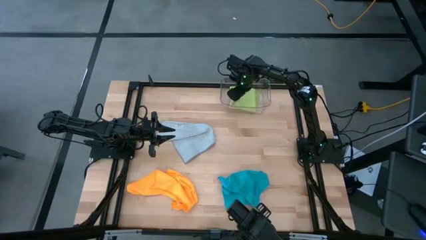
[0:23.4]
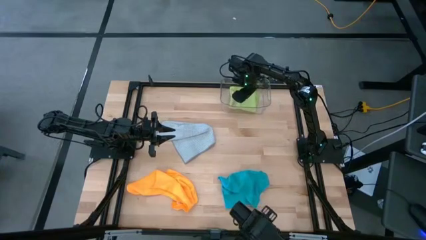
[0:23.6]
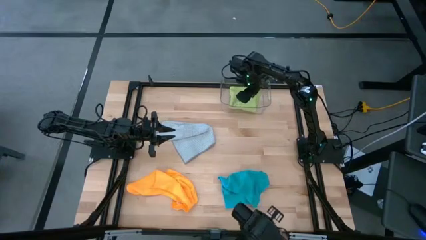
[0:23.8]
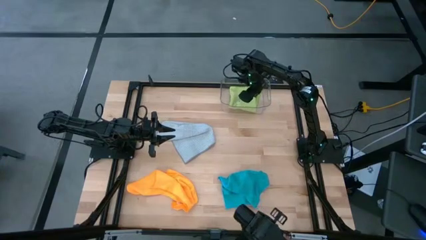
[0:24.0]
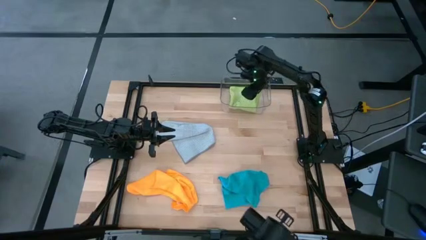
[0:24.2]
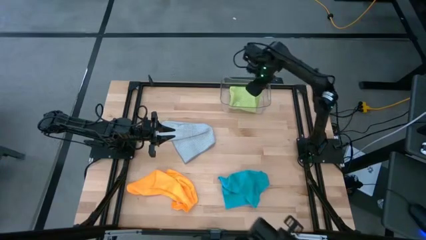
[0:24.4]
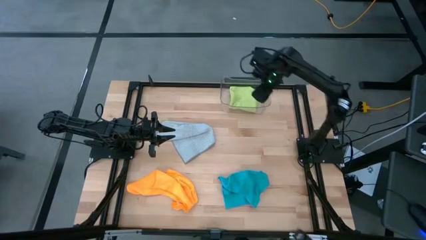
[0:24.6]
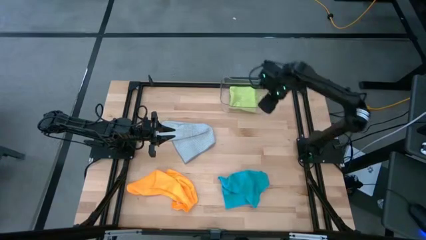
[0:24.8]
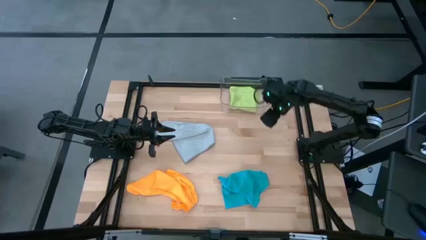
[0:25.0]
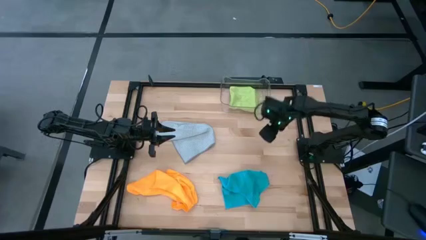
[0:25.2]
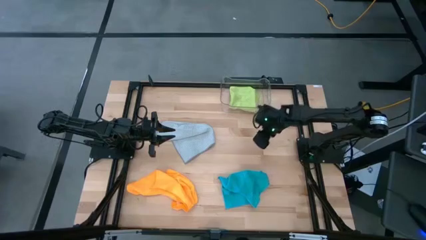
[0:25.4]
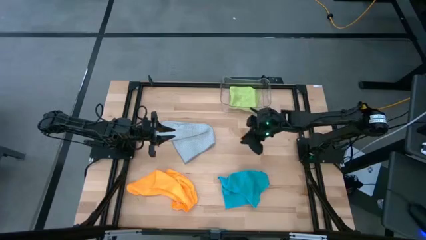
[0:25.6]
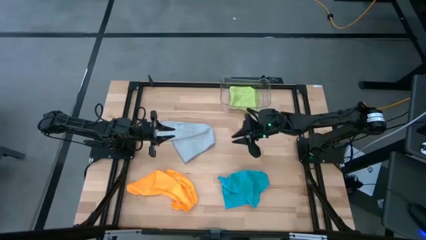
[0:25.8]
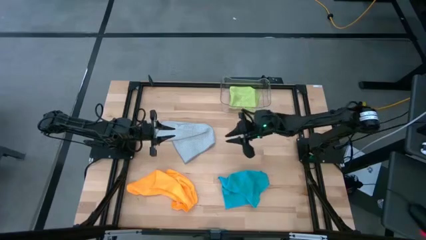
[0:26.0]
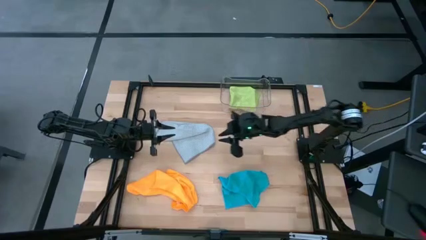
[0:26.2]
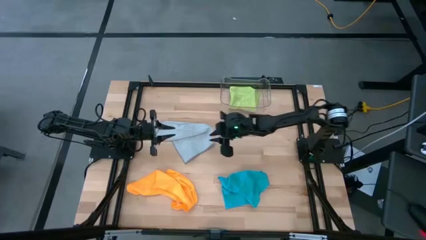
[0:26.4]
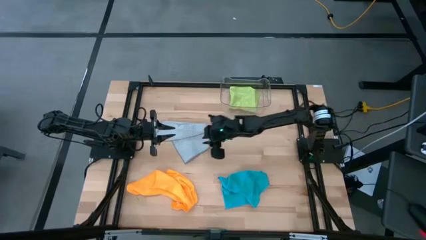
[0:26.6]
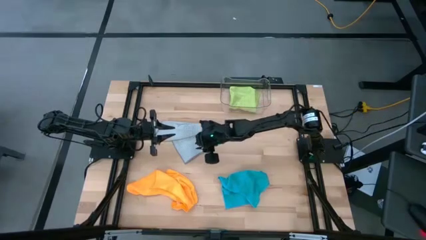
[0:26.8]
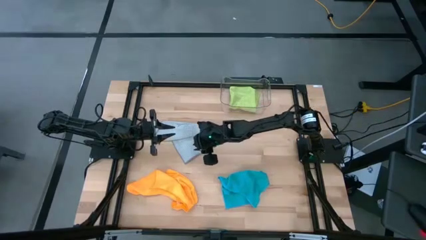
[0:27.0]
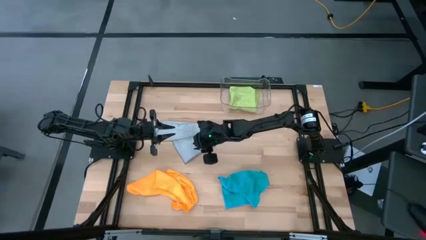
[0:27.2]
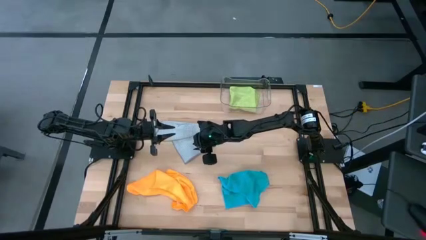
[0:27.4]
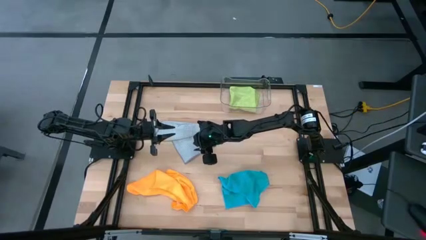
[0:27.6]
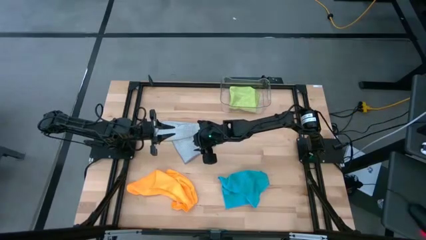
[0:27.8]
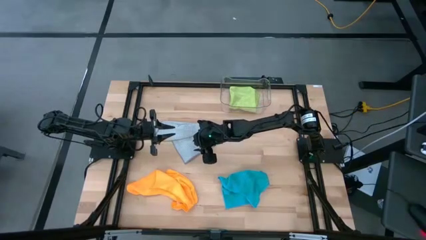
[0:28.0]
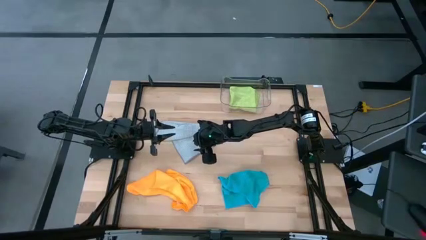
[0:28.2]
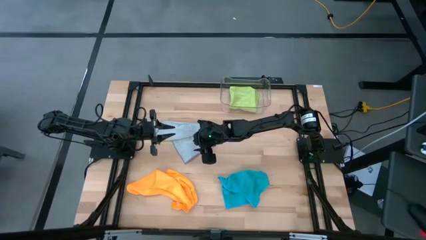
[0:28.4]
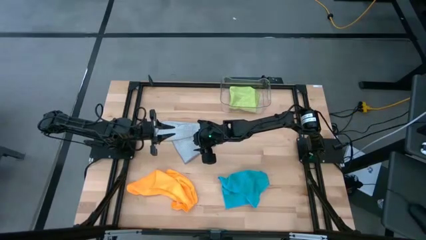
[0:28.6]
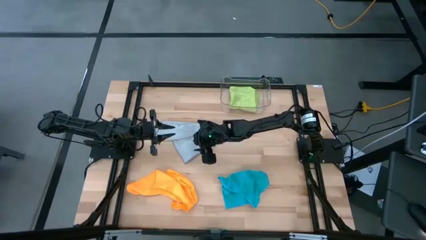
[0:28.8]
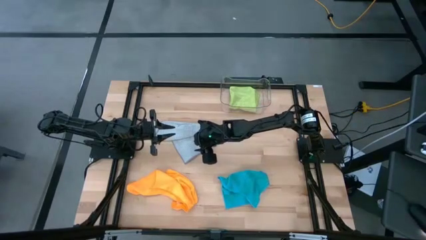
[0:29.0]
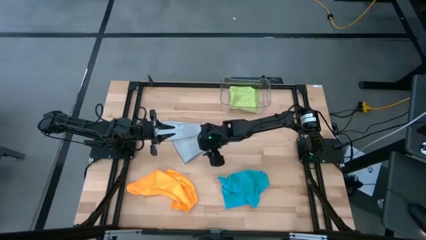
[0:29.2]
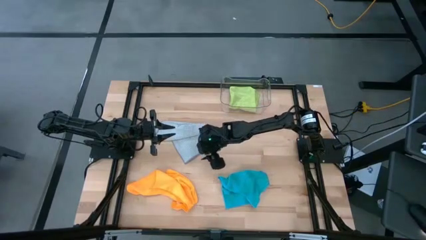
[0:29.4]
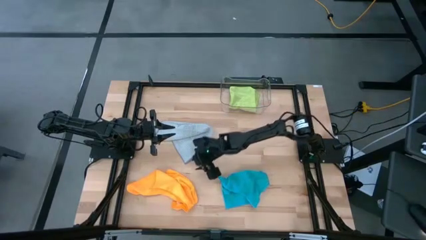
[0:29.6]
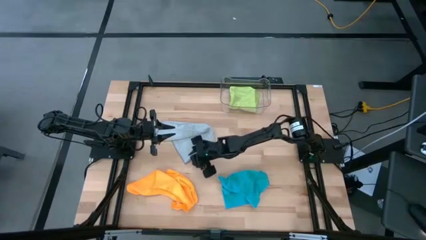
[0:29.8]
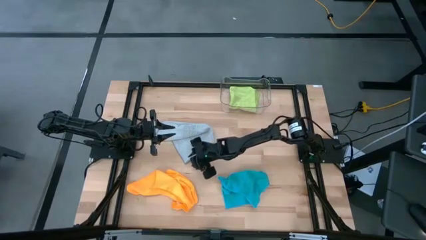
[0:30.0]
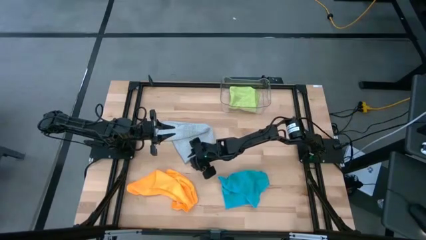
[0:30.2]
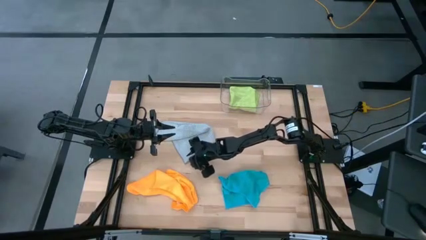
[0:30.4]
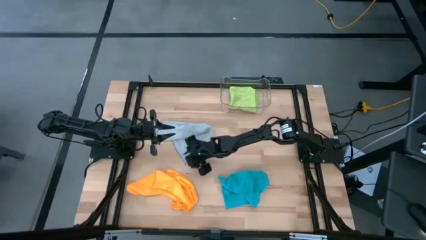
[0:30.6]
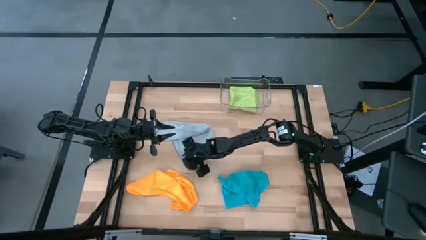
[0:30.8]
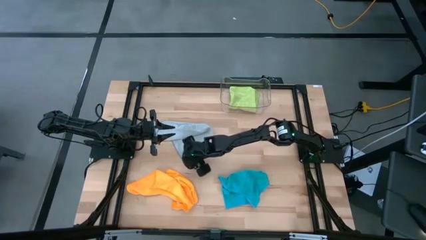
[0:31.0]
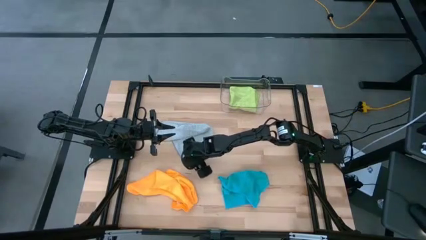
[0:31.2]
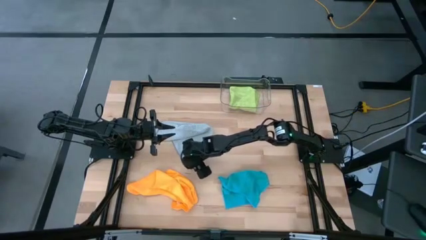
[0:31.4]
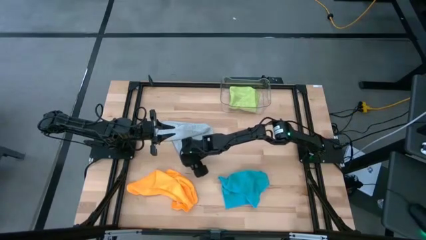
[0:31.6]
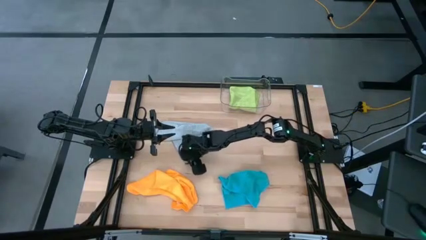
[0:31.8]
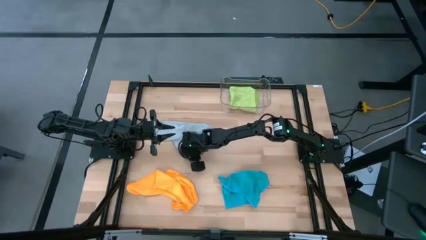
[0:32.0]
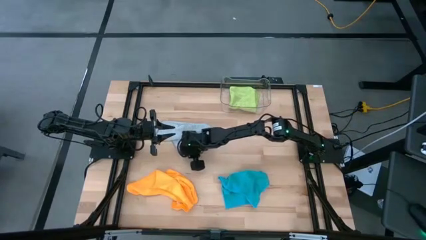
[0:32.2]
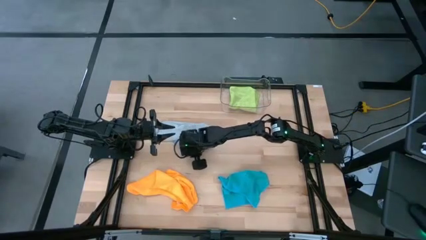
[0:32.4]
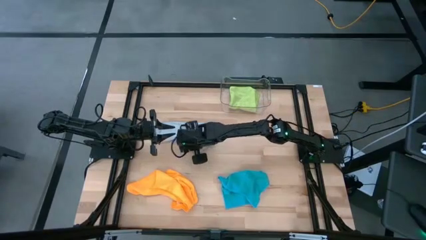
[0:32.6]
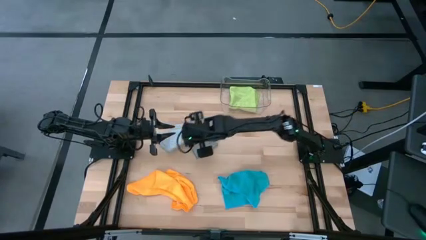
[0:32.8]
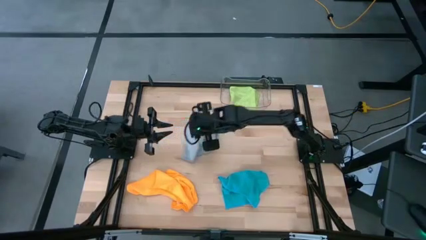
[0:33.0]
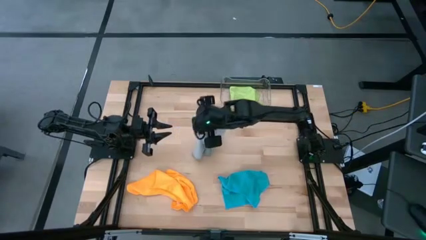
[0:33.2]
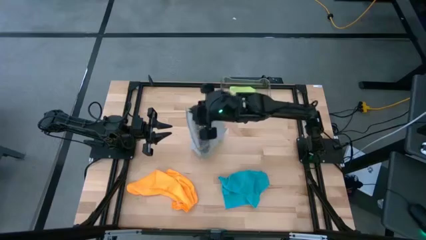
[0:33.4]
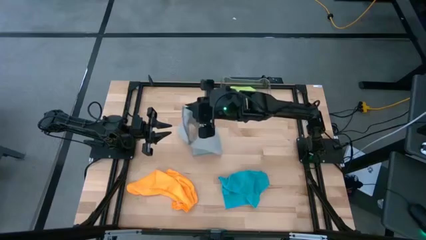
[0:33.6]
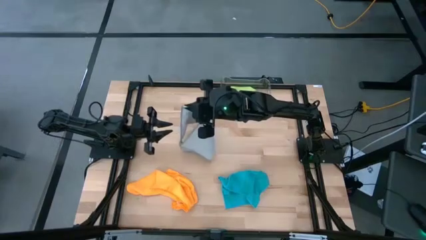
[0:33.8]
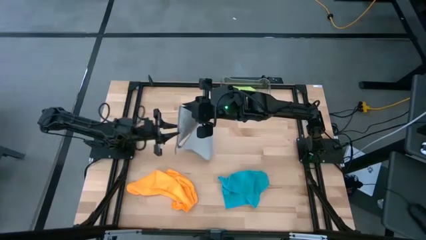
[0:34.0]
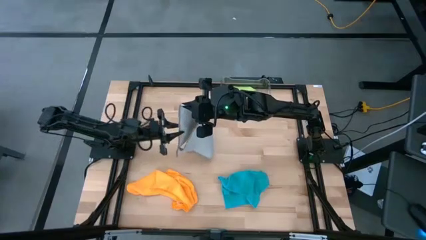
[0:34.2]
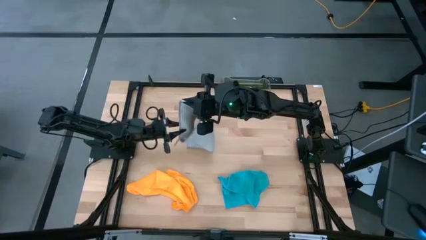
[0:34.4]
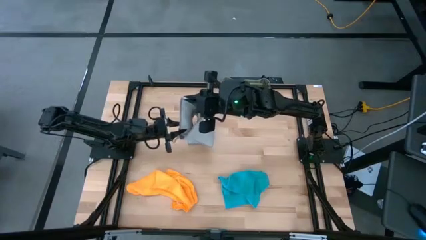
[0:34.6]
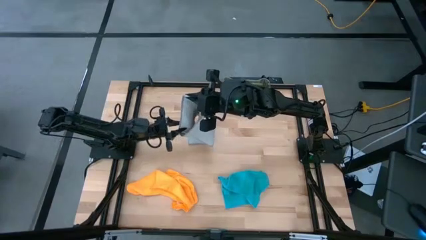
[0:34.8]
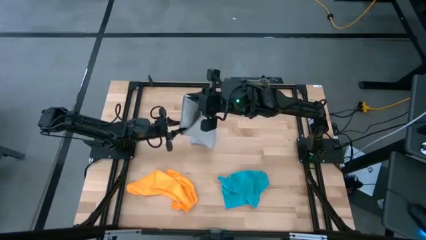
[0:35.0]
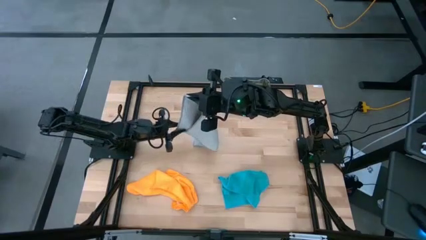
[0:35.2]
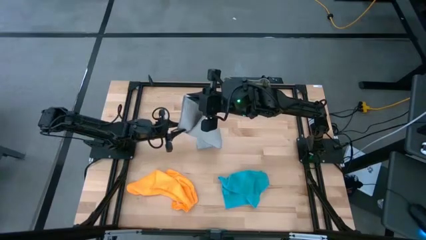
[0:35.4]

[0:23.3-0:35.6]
Task: Fold microfiber towels
Fold the gray microfiber towel
